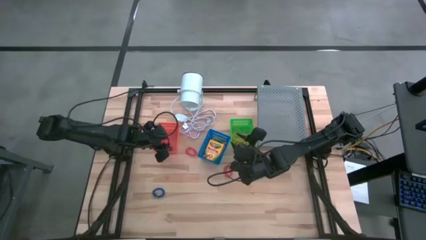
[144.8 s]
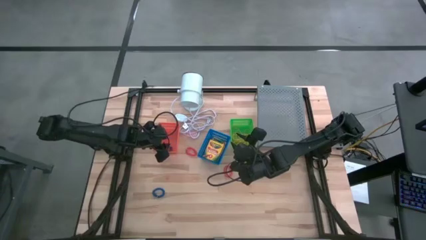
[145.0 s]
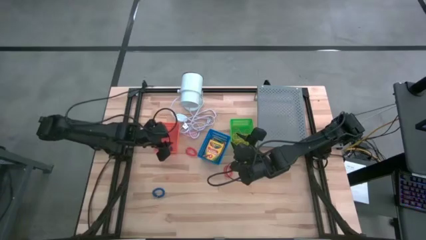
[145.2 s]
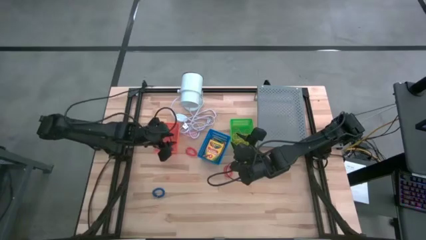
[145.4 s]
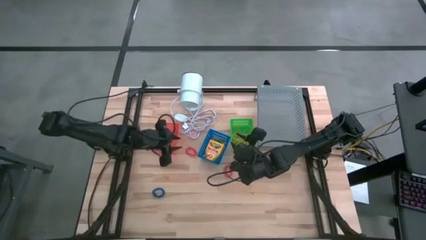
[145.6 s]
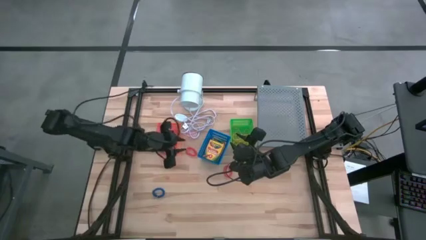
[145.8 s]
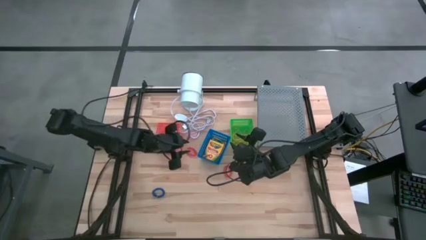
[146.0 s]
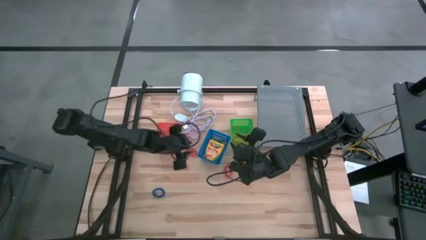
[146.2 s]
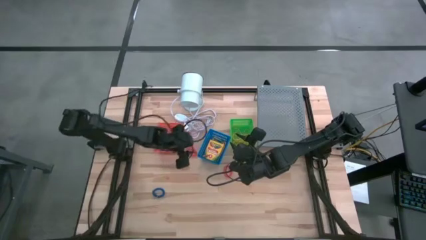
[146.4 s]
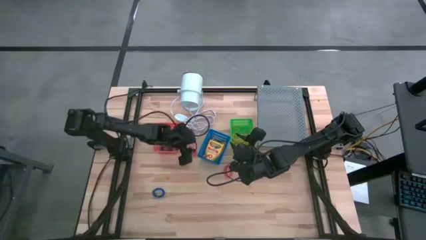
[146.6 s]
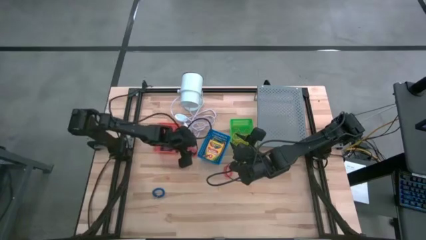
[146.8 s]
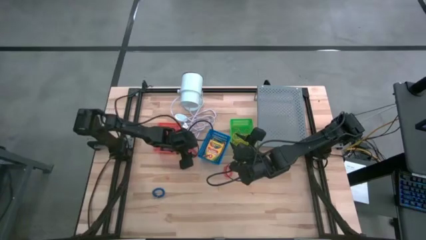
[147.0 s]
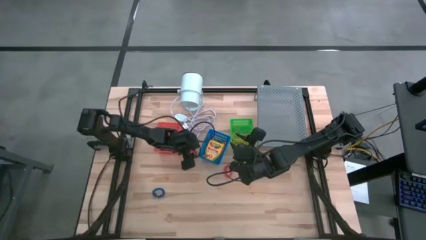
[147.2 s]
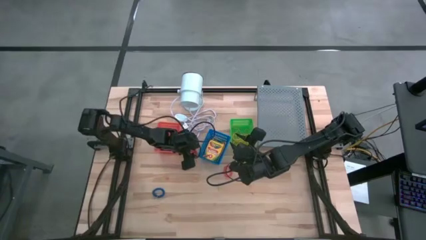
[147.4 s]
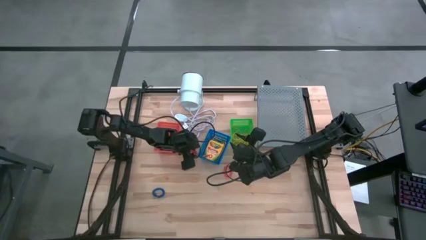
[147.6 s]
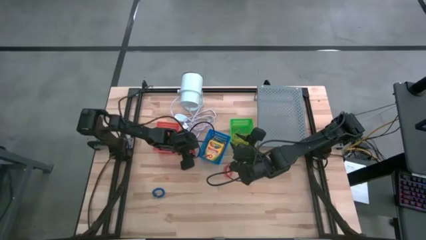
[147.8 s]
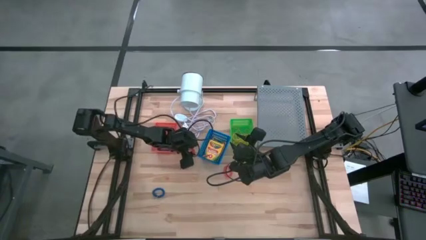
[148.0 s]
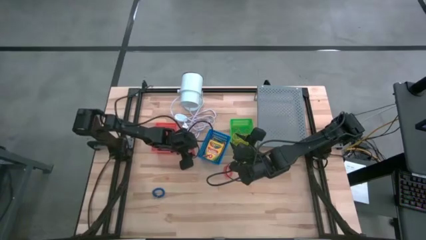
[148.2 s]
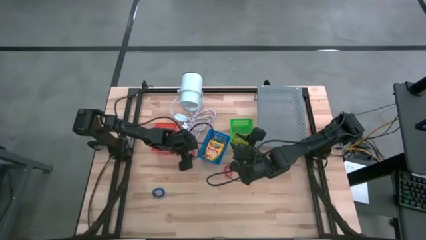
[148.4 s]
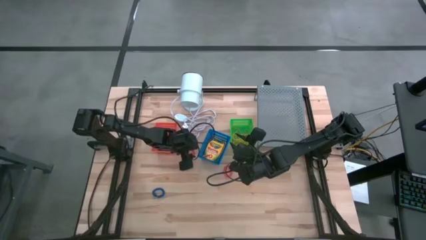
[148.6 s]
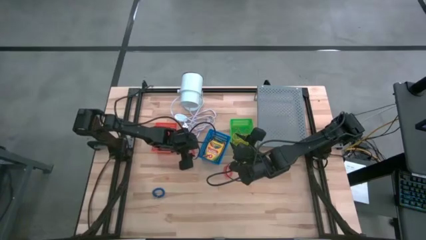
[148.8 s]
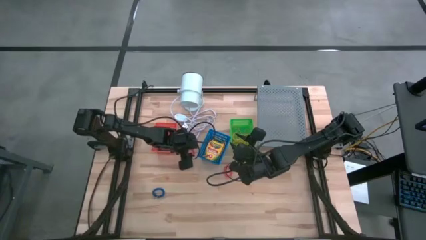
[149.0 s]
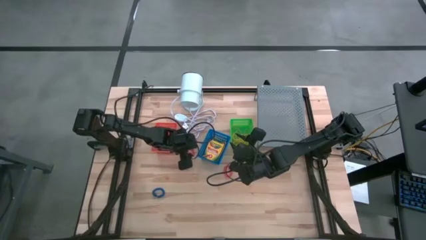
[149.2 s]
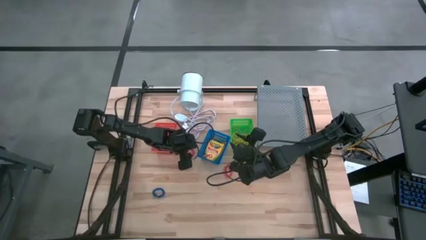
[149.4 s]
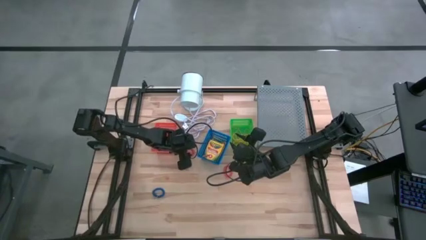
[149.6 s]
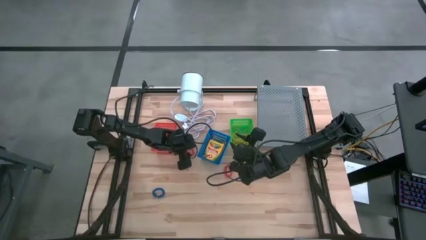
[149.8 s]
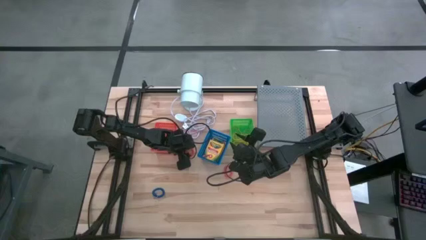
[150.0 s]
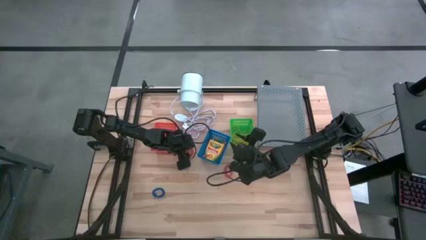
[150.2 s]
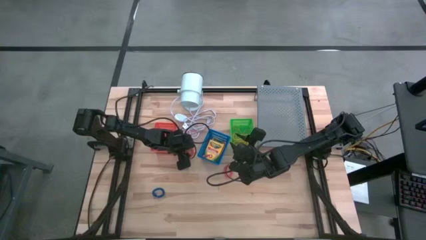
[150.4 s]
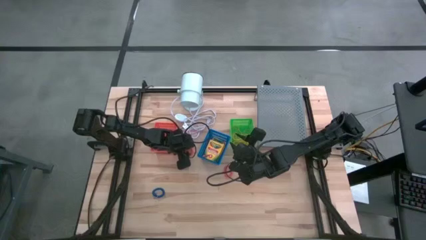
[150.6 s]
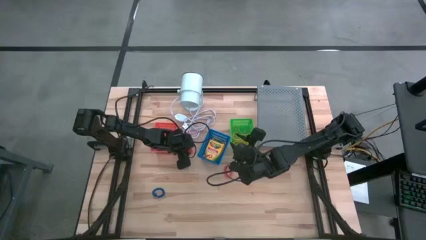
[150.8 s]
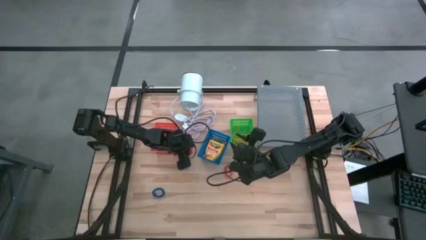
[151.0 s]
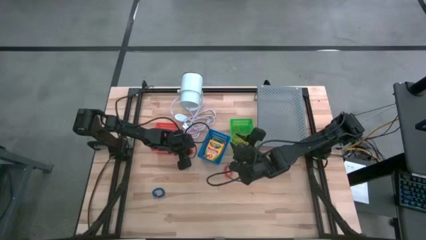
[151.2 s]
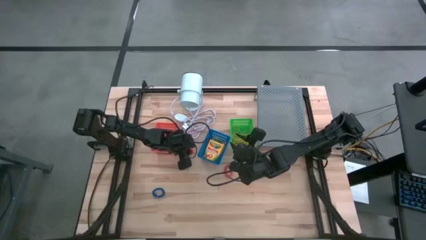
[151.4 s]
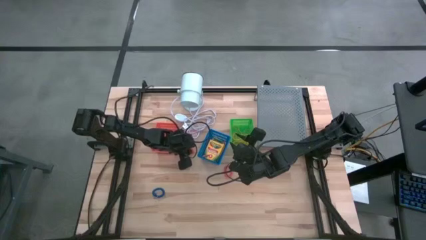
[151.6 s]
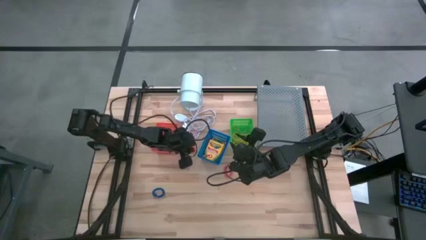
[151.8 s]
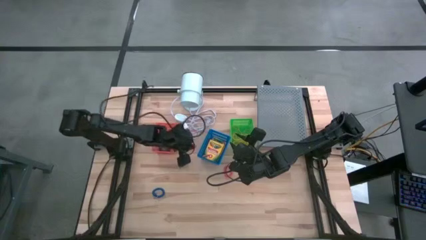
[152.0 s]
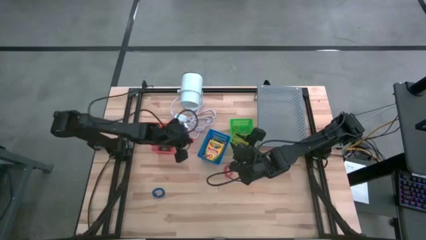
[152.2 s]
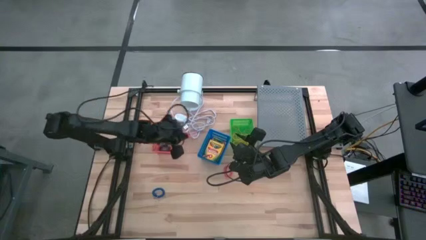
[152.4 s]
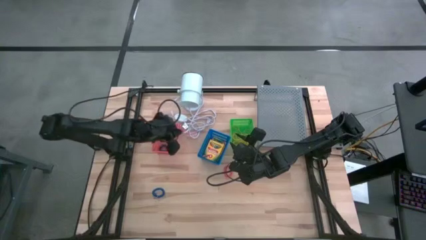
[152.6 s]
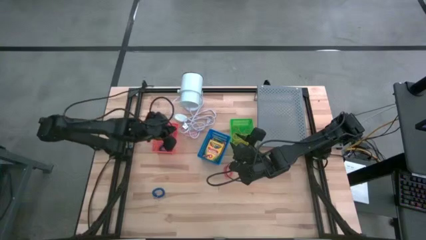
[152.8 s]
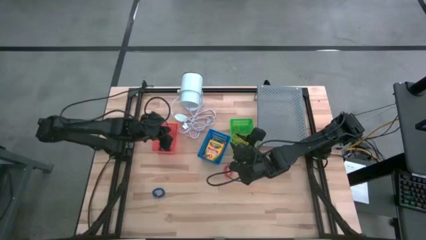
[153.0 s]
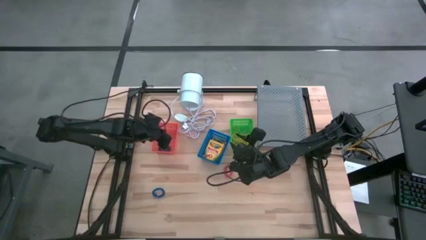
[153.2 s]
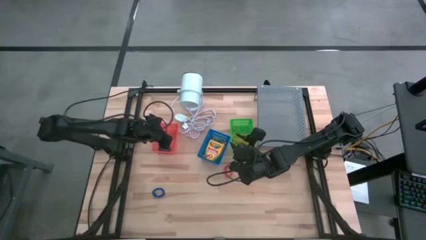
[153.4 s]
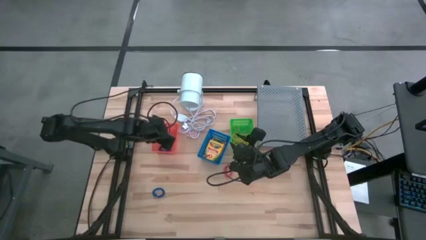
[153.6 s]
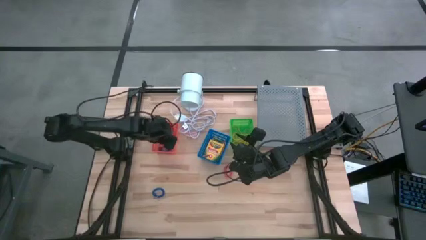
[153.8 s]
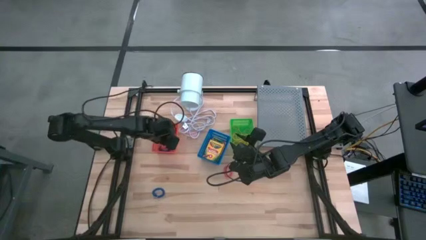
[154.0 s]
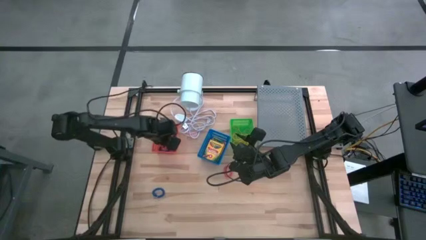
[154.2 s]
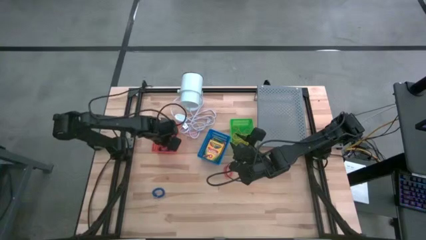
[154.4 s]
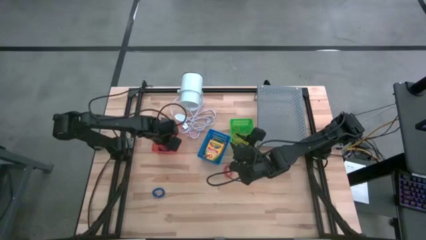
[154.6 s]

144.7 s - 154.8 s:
Task: Pick & Place Office Desk Supplies
Put the orange spring keychain into the orange bin
